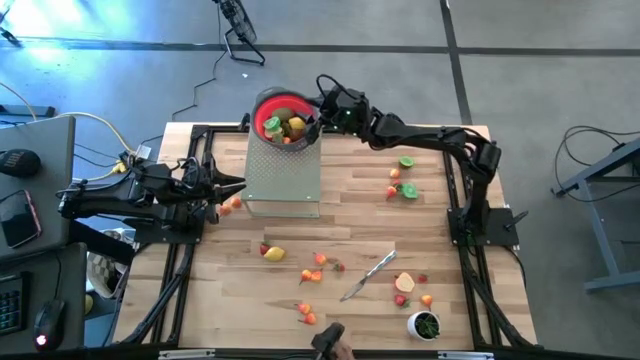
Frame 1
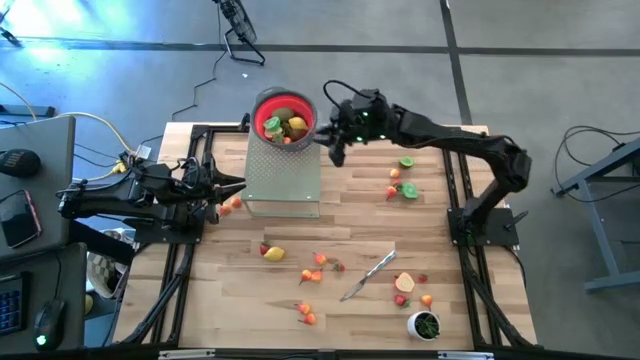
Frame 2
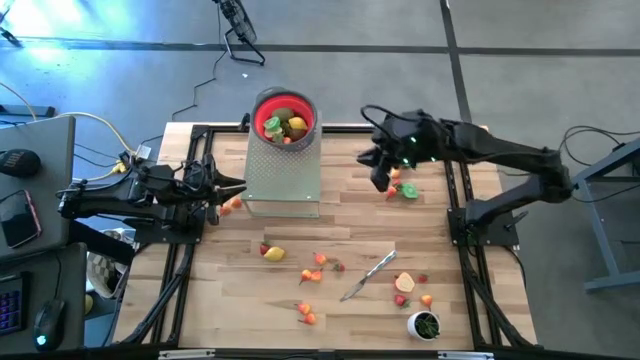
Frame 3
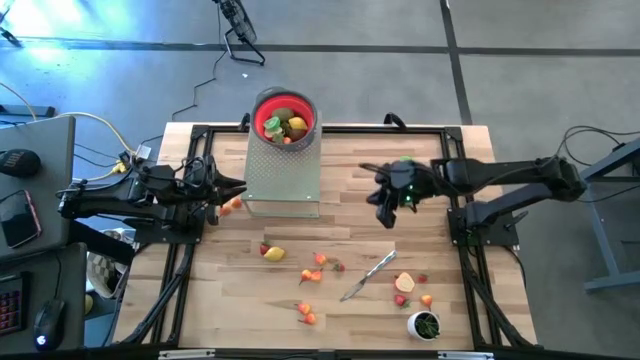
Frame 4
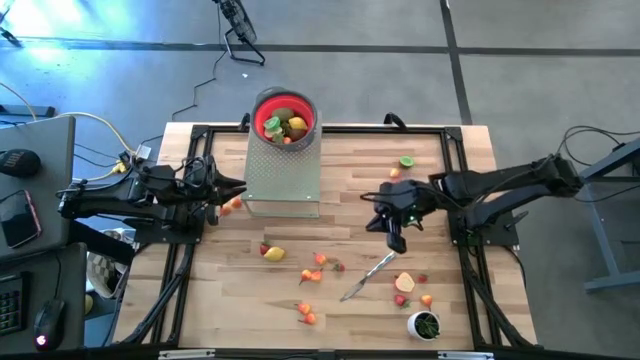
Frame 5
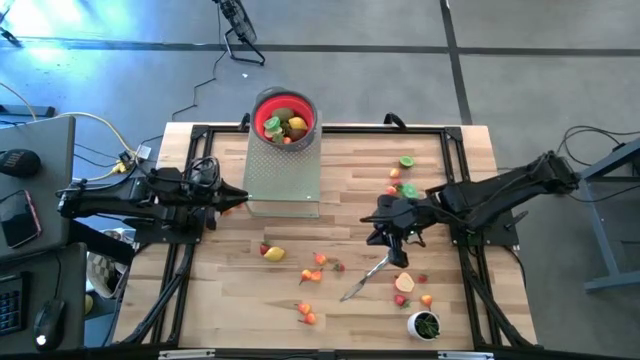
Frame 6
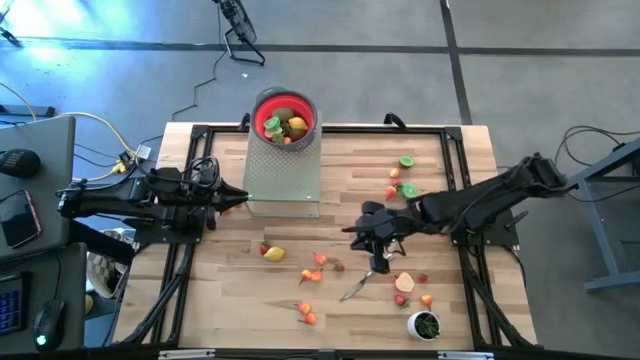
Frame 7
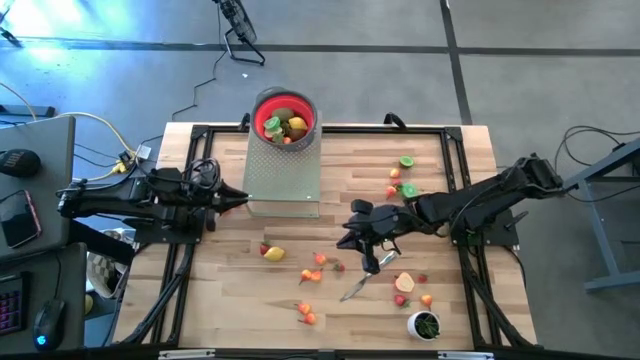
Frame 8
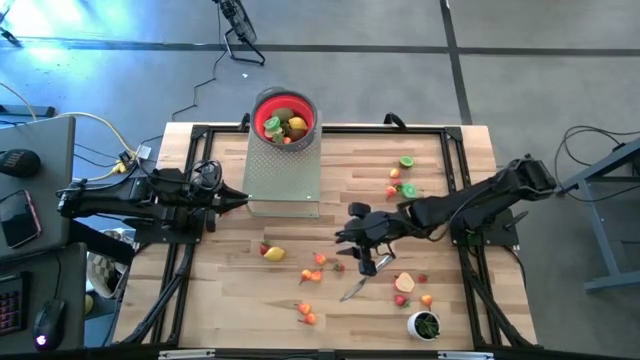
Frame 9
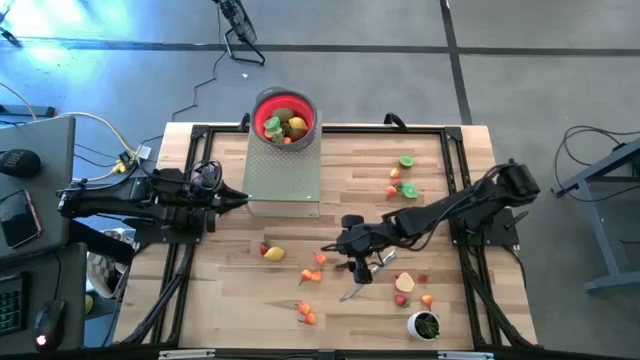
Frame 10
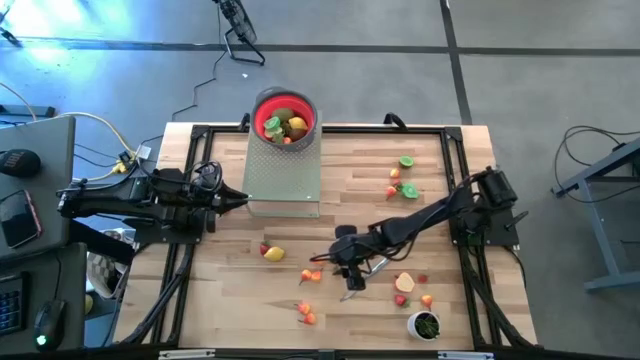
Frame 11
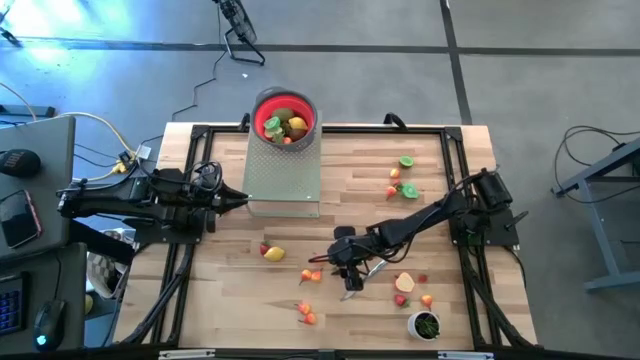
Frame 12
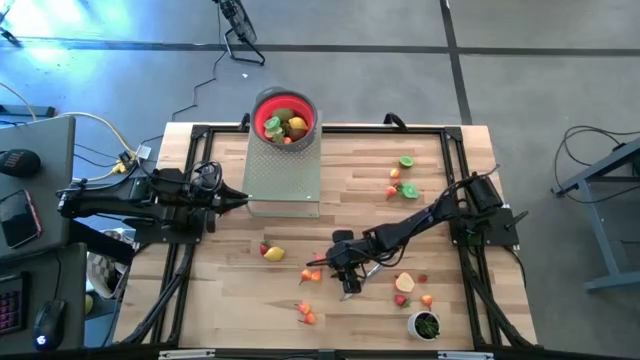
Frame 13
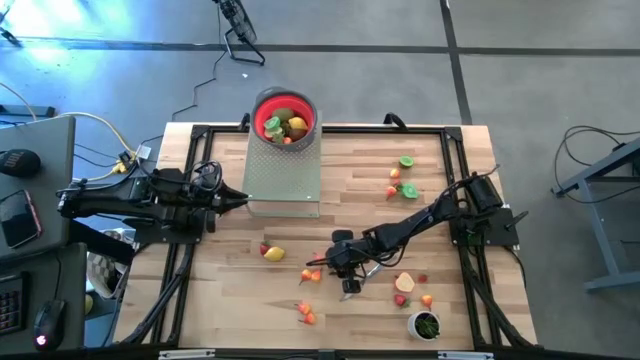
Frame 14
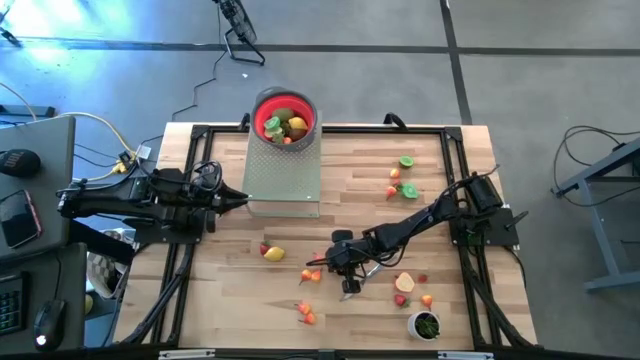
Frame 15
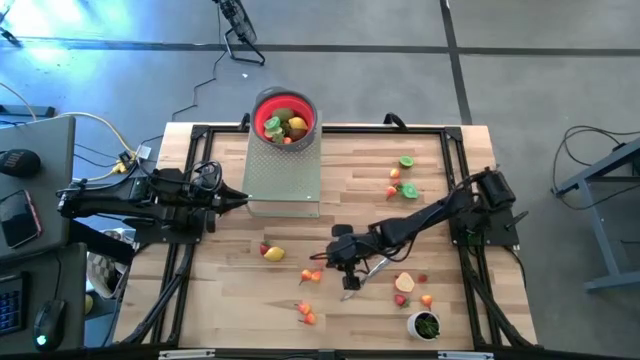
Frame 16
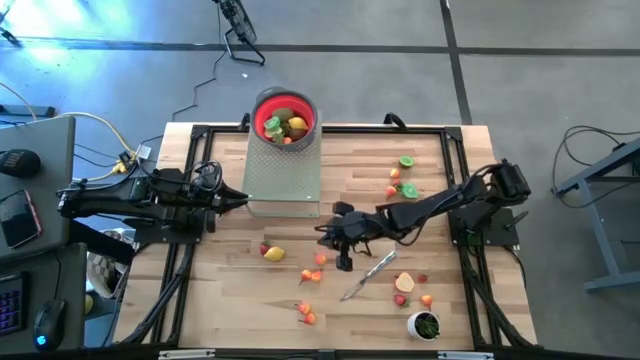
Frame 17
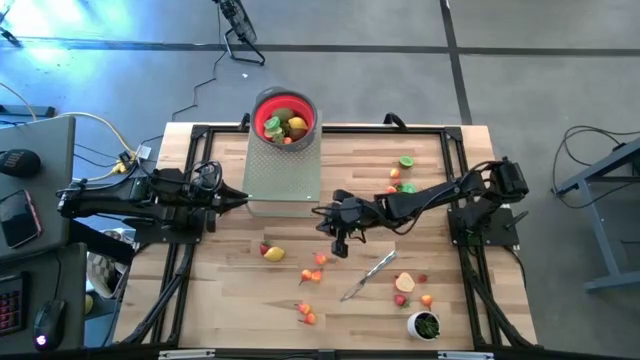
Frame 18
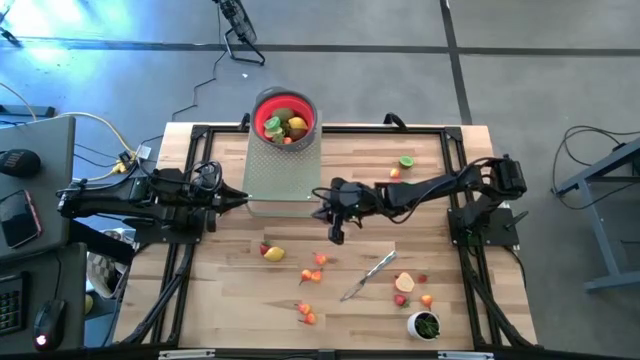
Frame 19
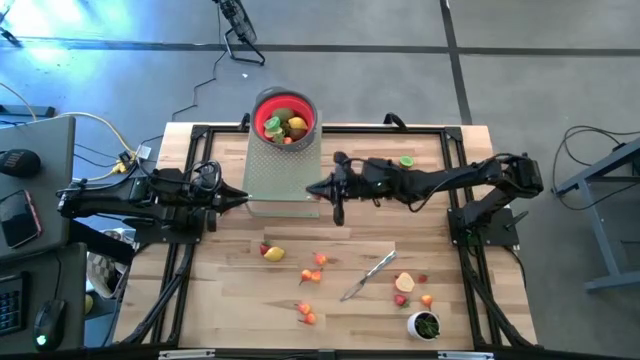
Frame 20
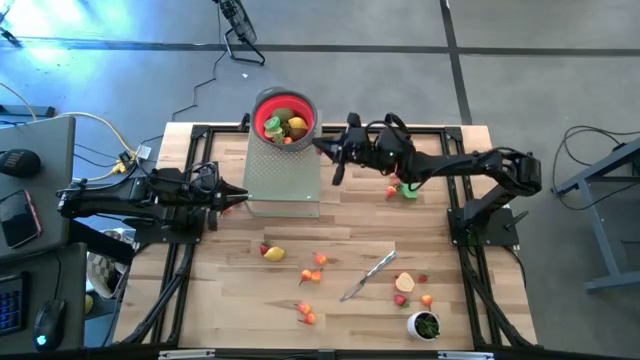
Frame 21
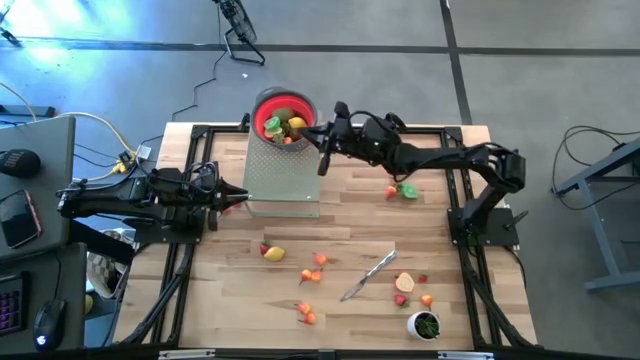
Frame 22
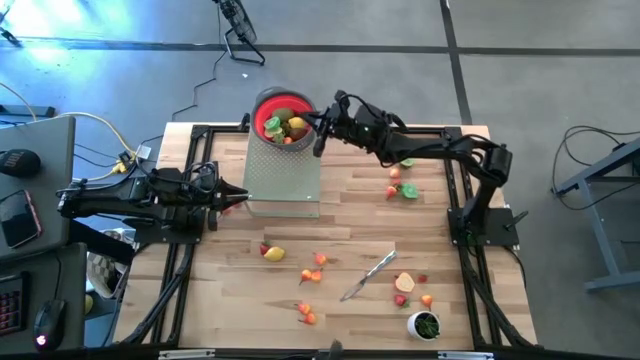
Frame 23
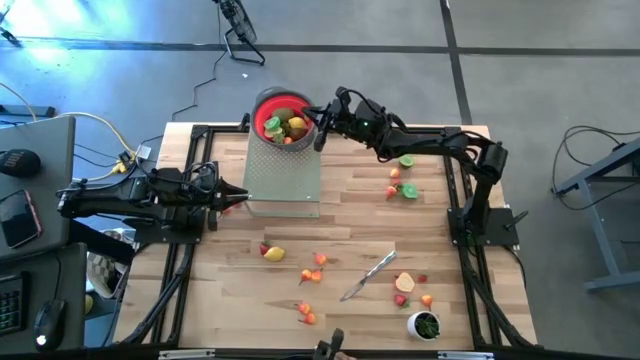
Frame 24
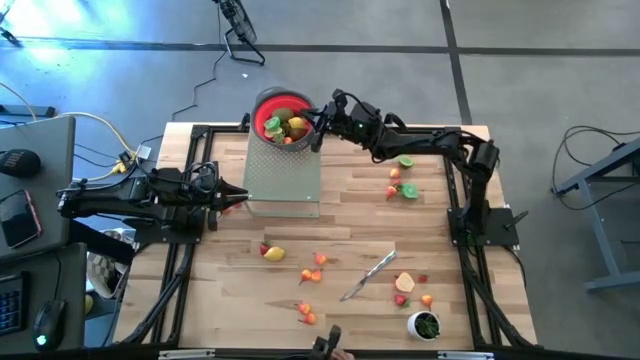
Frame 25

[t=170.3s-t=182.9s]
Task: Pick & Place Fruit
Put the strawberry into the red strainer on the shelf

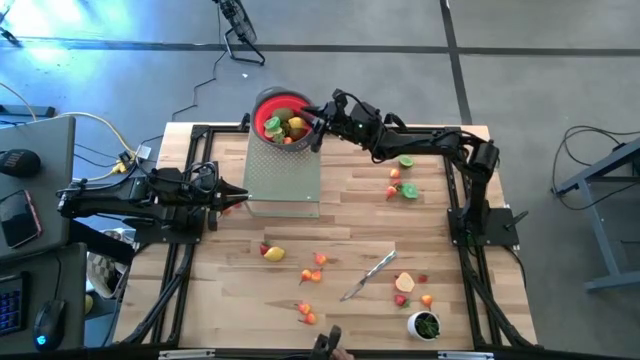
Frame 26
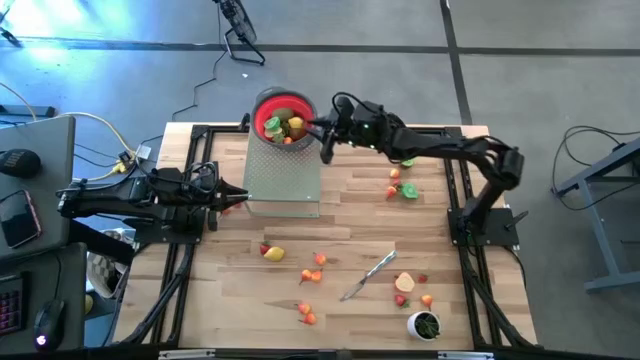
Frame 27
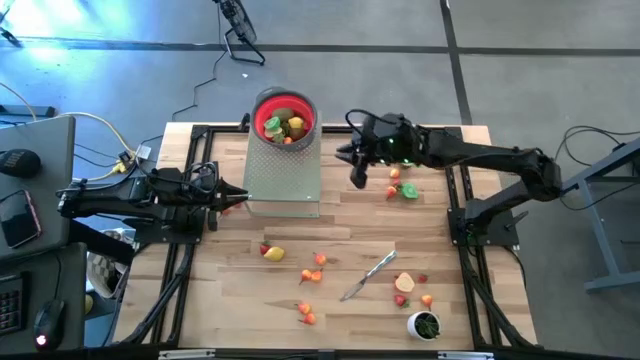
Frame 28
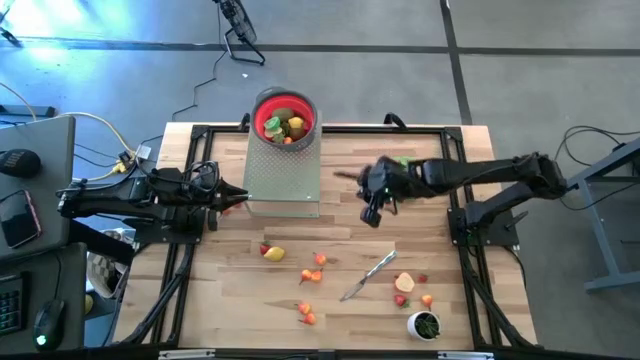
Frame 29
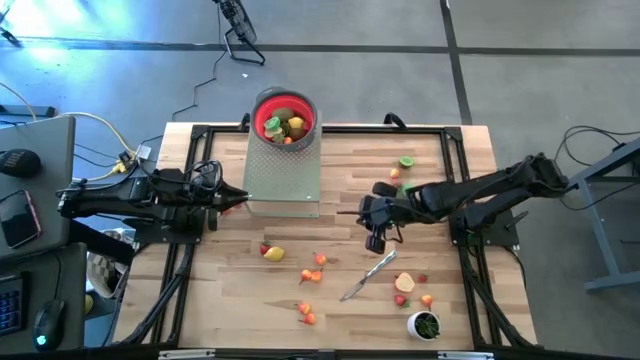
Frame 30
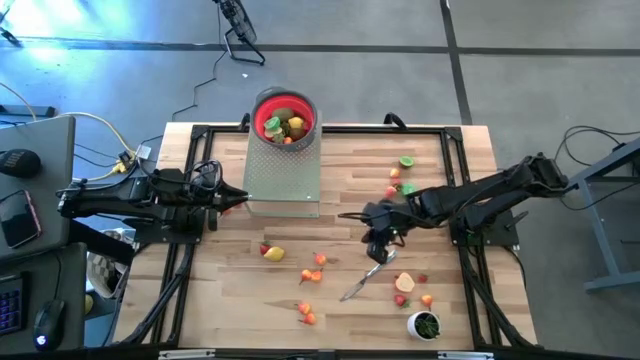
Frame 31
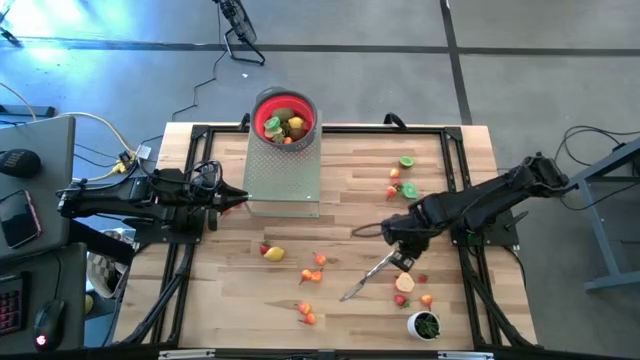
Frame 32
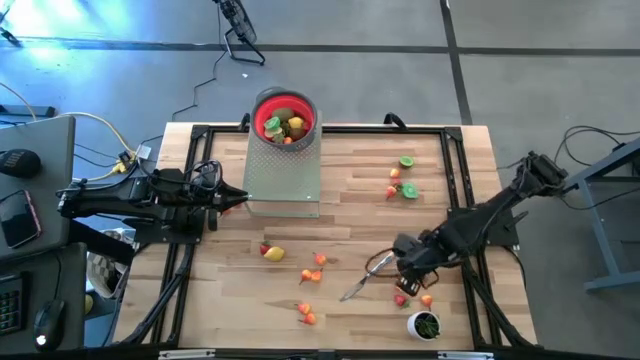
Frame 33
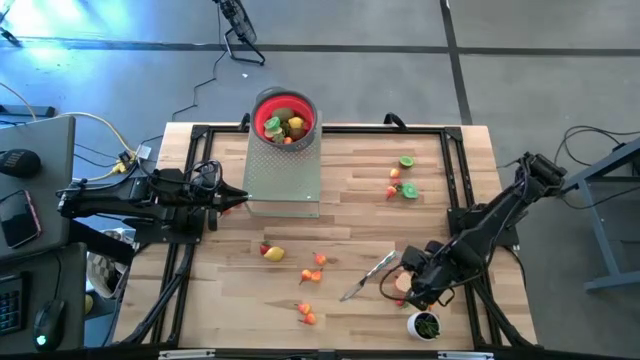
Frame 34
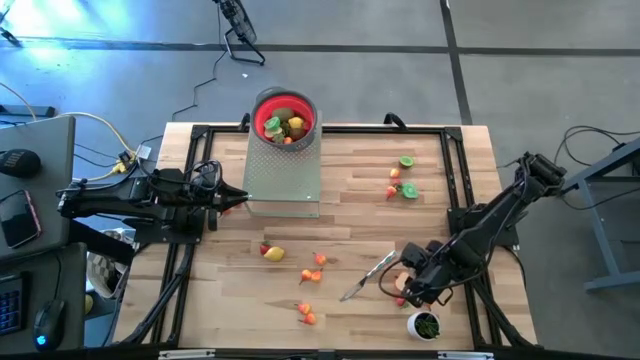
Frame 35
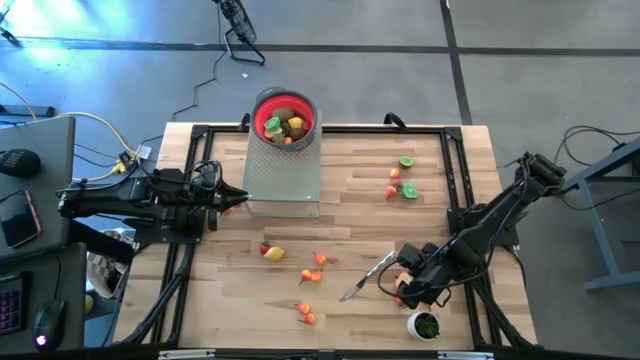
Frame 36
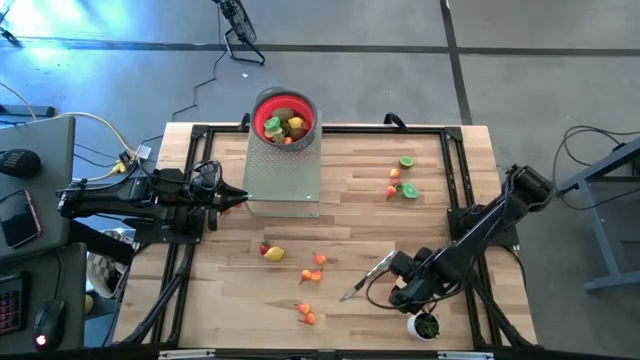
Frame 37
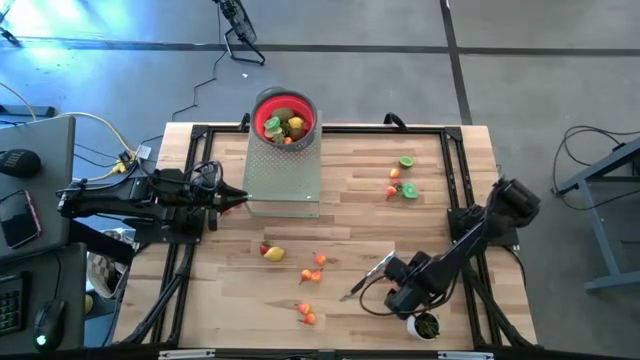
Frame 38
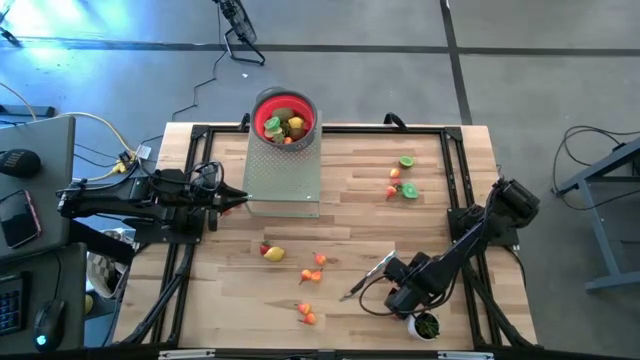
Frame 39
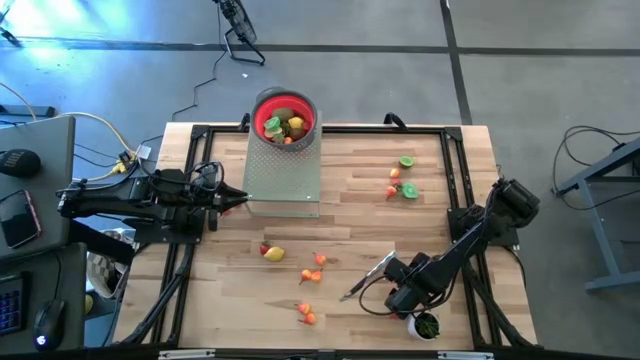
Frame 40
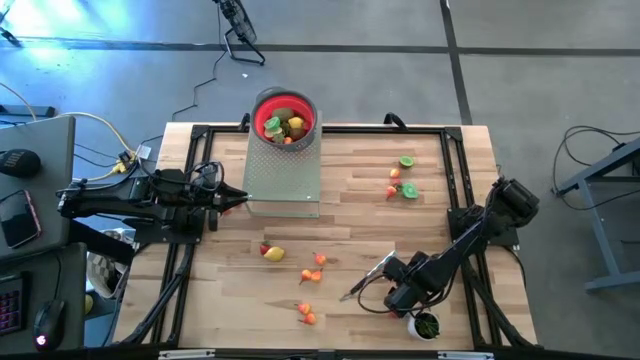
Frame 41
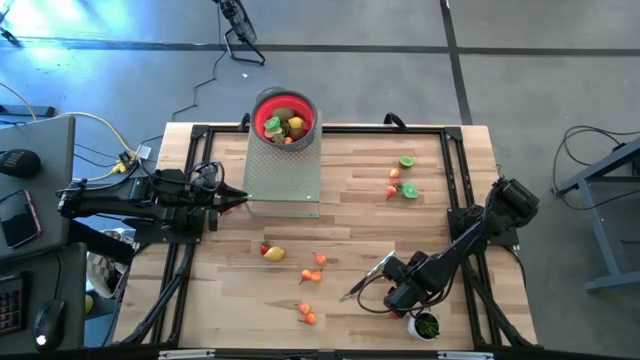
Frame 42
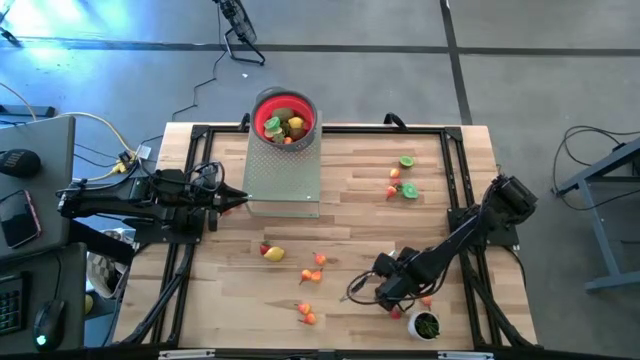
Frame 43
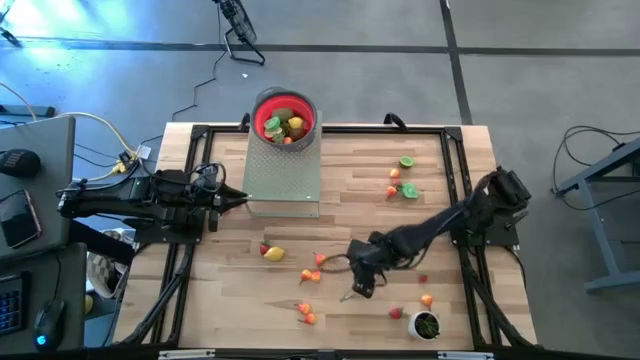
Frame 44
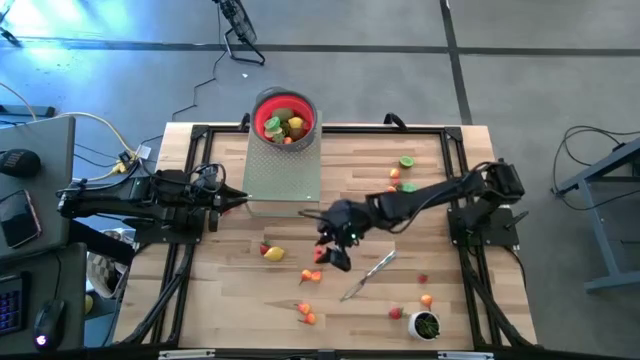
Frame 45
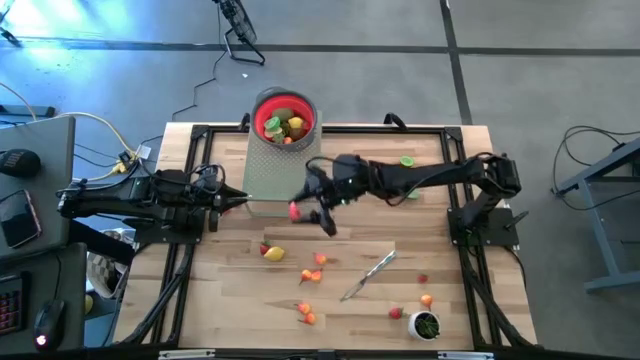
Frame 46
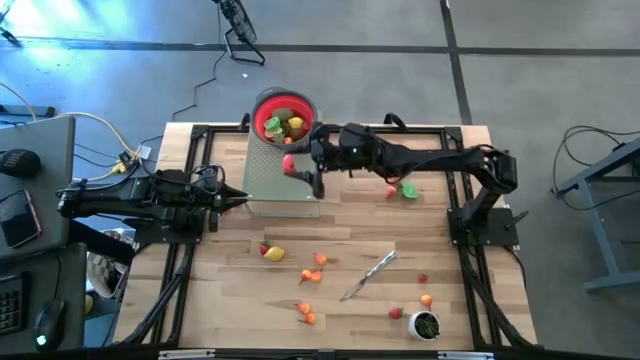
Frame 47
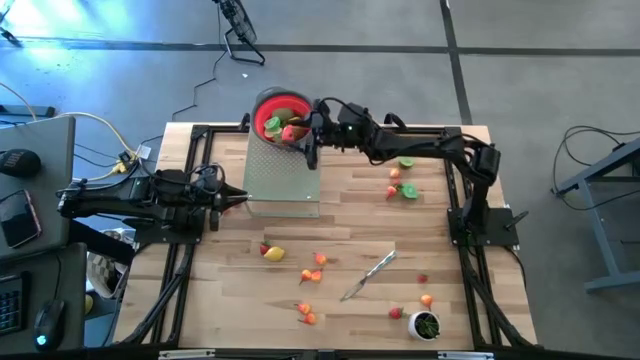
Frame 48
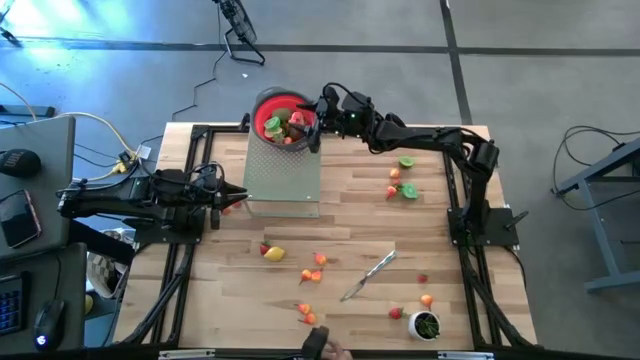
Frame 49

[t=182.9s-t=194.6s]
Put the half apple into the red strainer on the shelf
